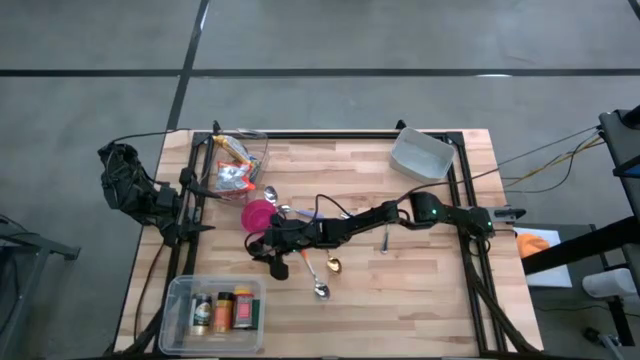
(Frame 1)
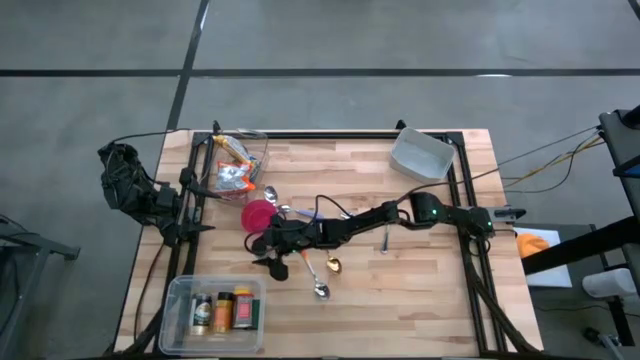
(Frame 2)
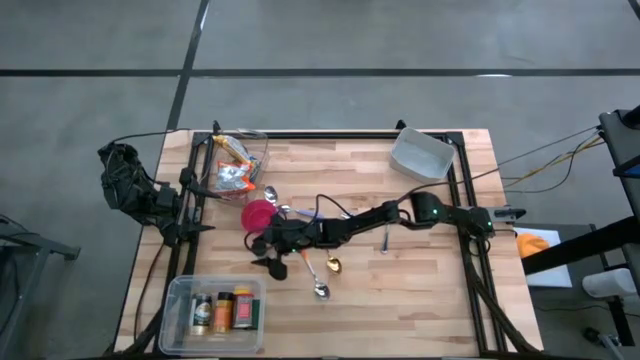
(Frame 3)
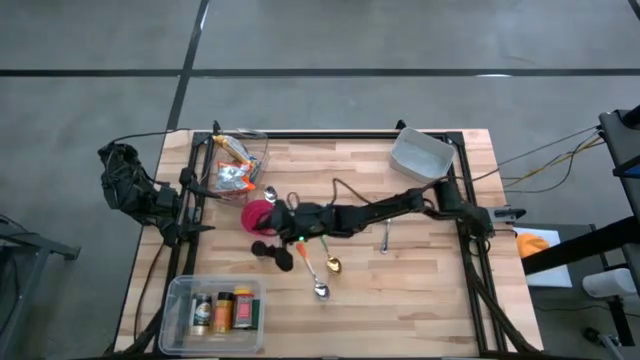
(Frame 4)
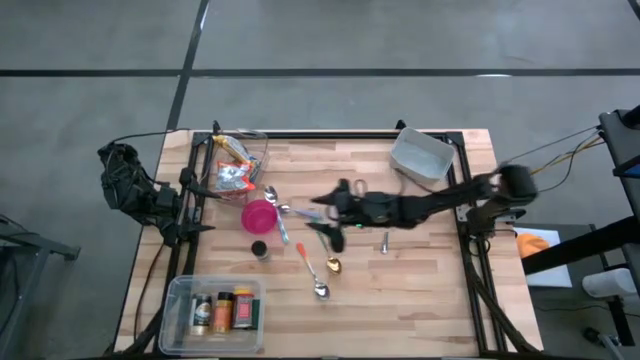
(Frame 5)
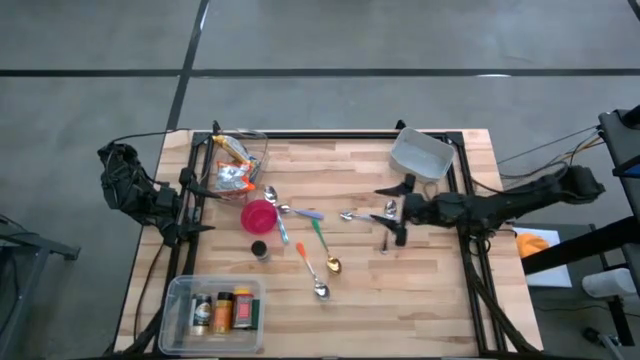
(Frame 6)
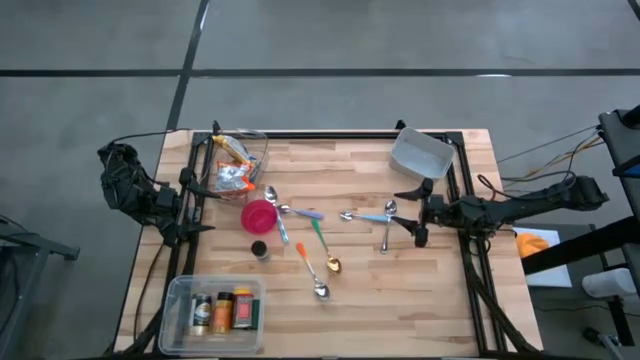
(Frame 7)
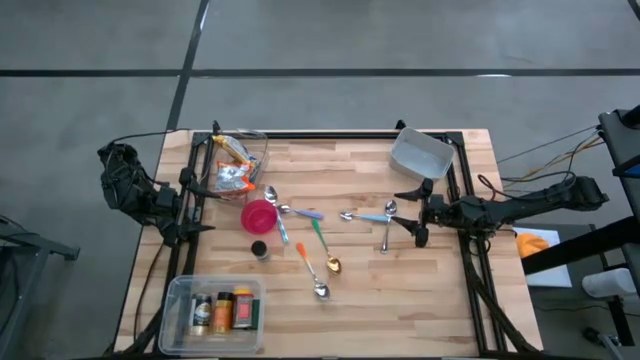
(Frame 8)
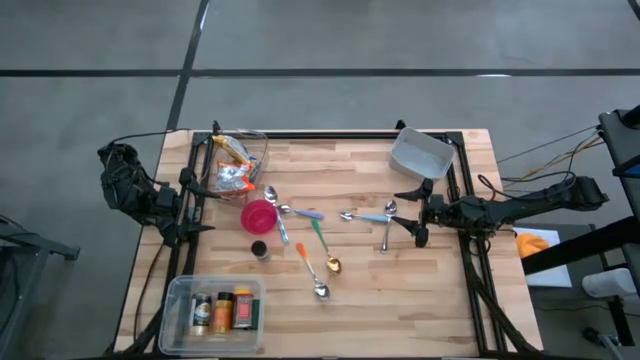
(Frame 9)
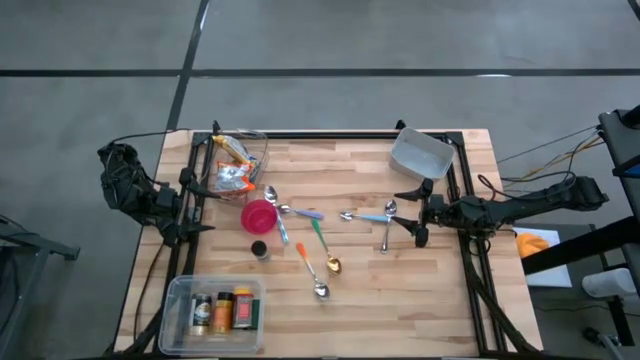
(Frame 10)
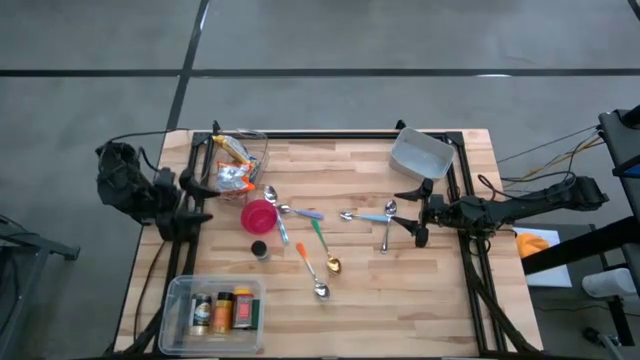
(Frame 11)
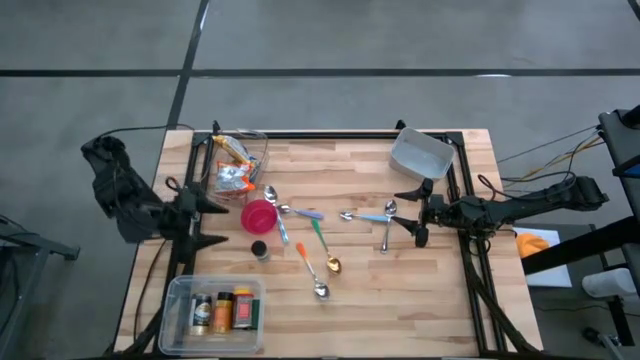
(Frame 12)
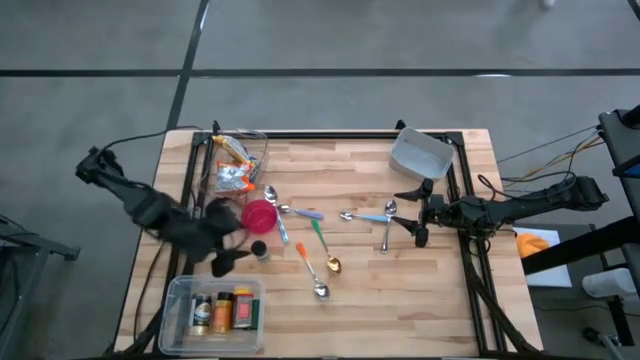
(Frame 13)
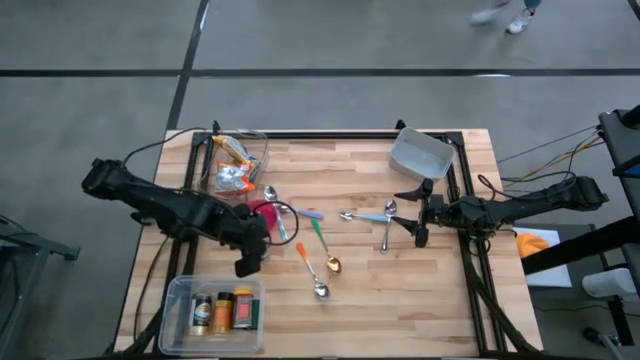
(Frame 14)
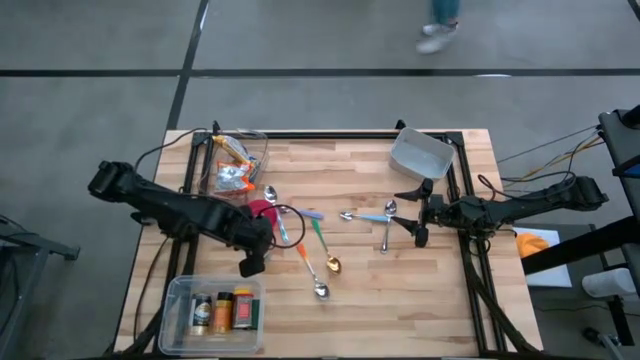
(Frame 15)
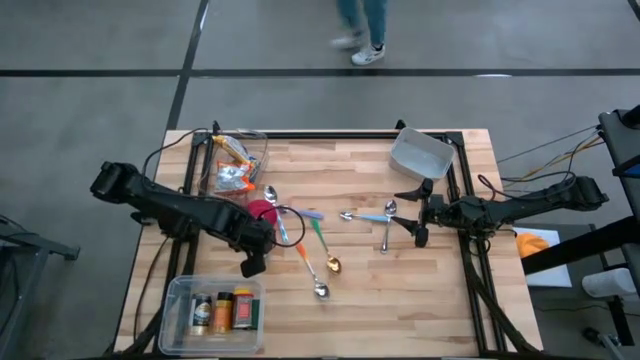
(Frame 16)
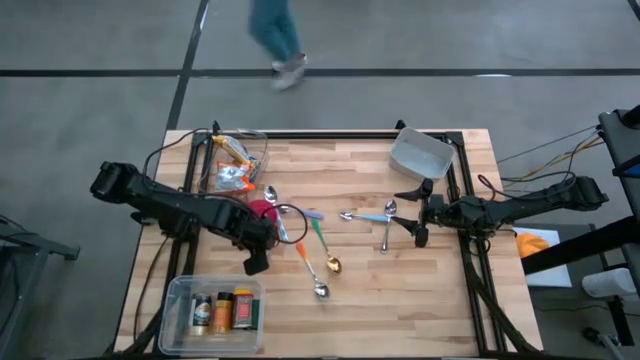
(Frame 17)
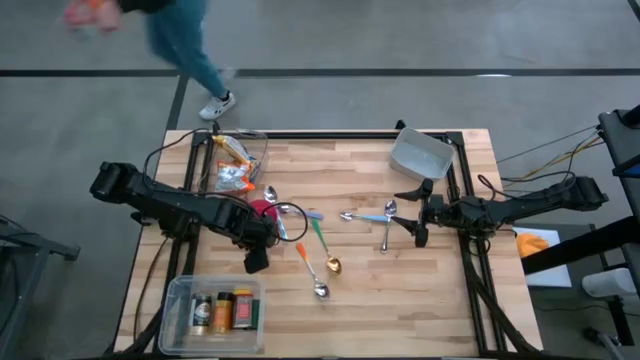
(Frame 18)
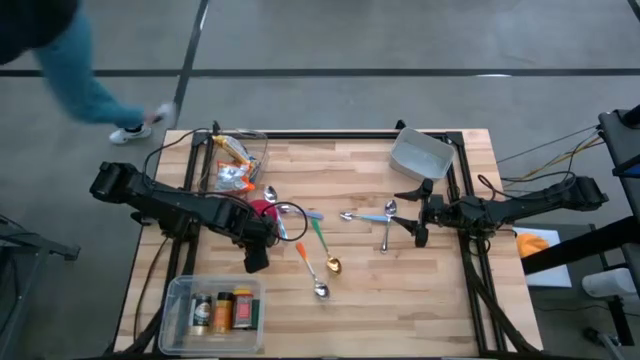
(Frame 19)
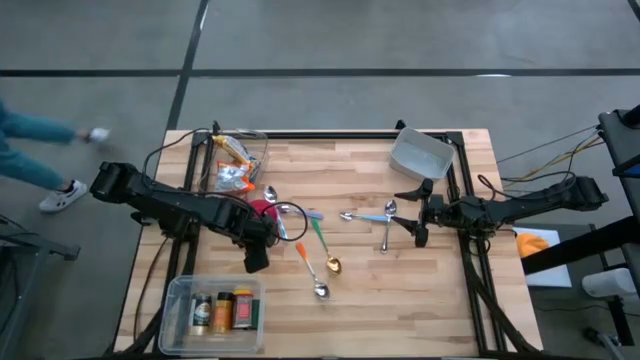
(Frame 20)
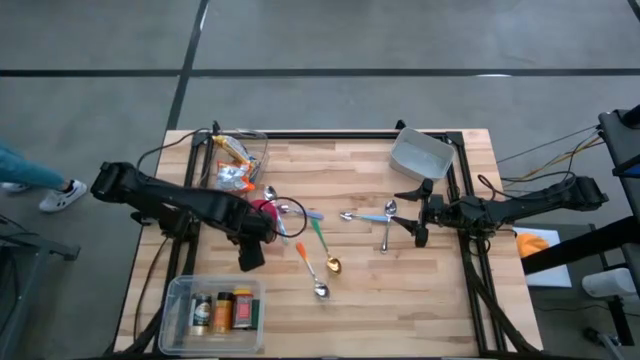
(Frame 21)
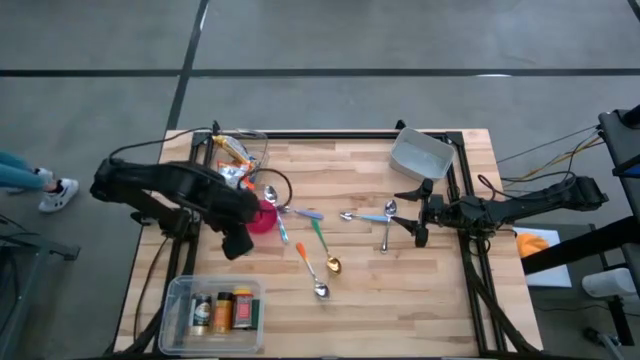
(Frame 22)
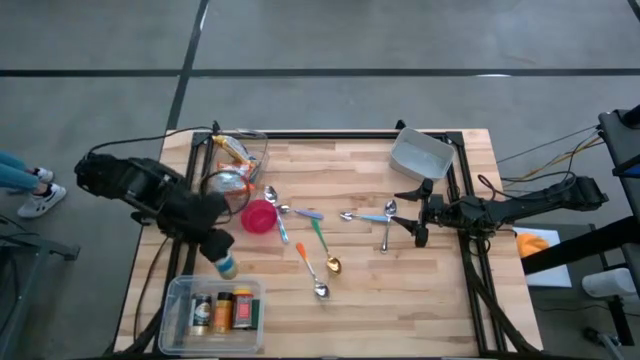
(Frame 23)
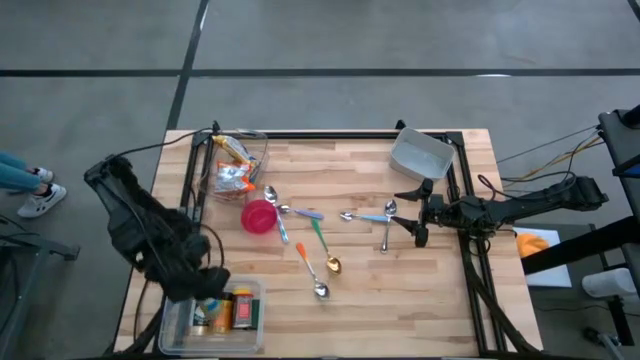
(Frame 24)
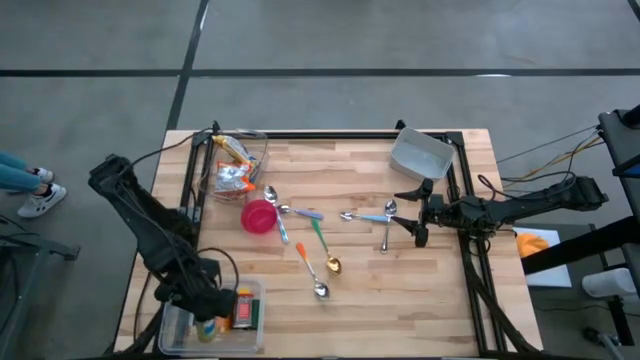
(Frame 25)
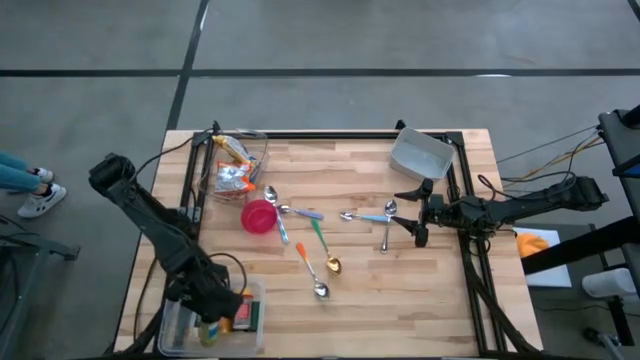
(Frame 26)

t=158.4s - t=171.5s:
Put the black seasoning bottle into the white bin
